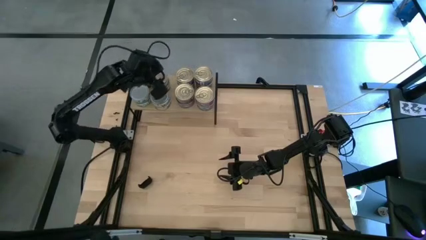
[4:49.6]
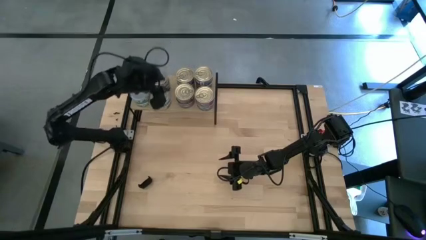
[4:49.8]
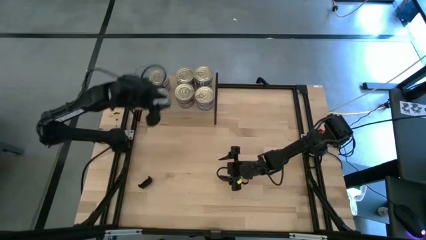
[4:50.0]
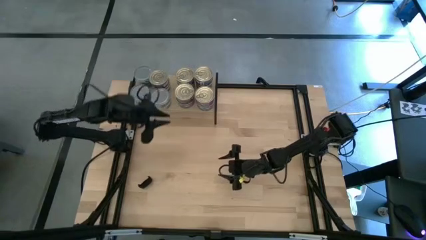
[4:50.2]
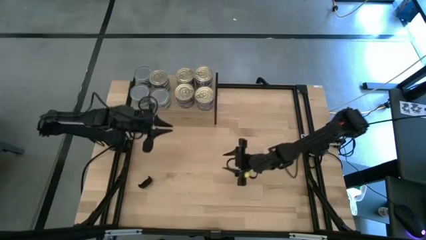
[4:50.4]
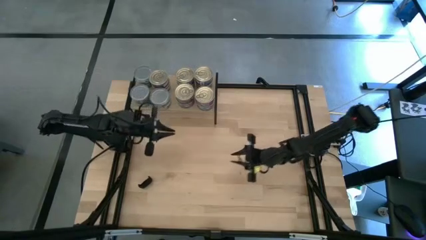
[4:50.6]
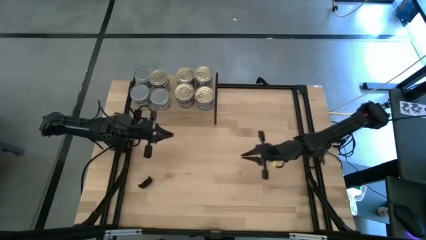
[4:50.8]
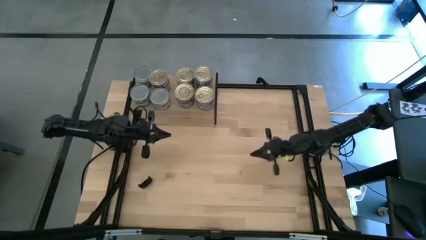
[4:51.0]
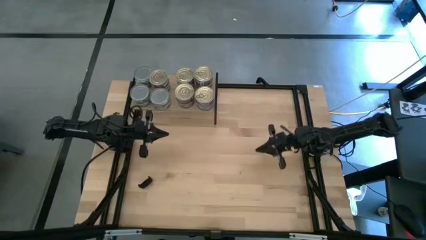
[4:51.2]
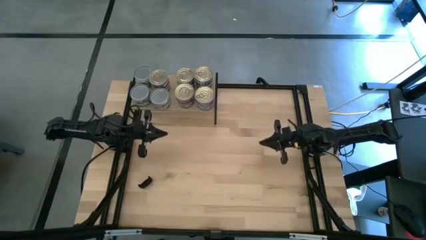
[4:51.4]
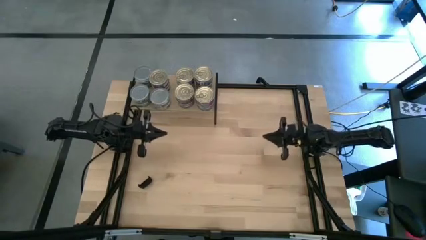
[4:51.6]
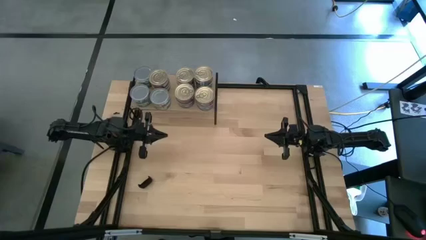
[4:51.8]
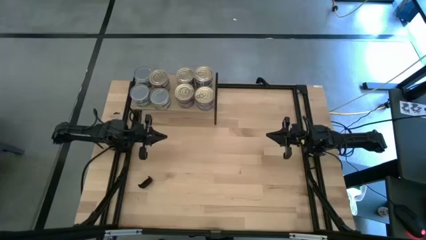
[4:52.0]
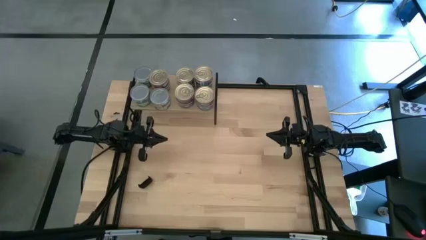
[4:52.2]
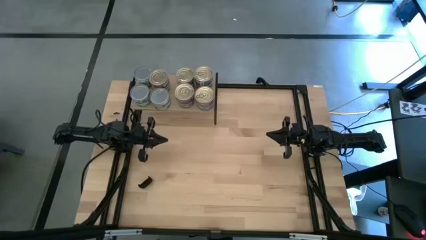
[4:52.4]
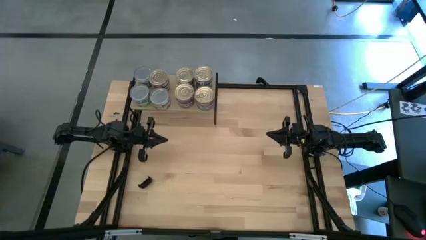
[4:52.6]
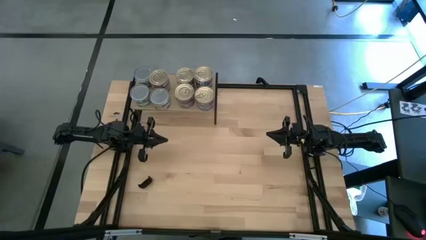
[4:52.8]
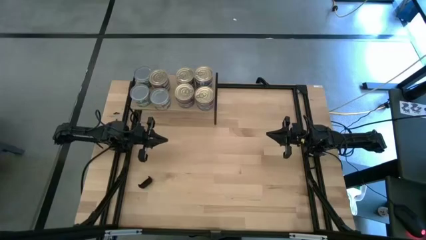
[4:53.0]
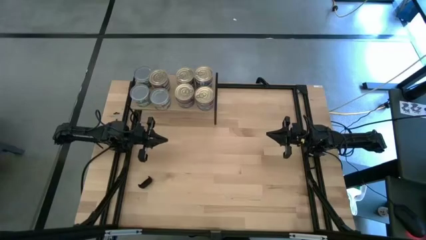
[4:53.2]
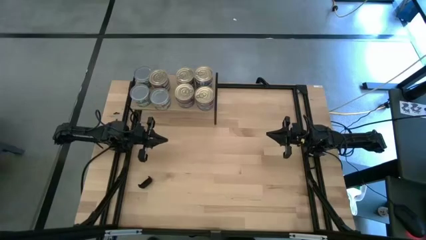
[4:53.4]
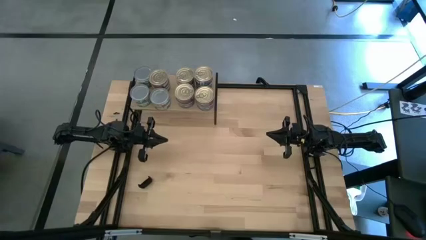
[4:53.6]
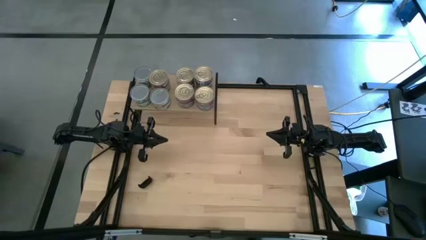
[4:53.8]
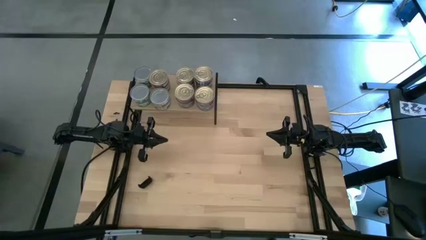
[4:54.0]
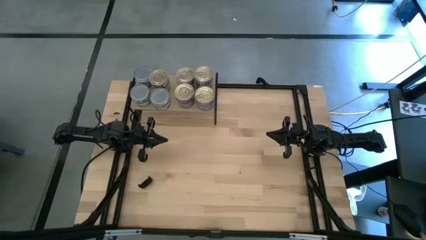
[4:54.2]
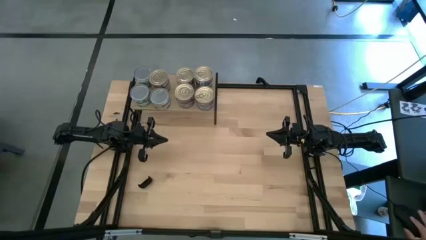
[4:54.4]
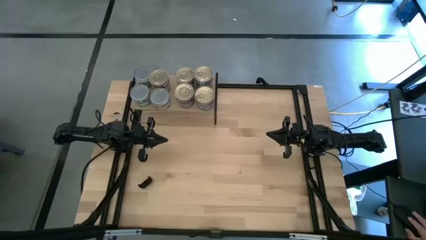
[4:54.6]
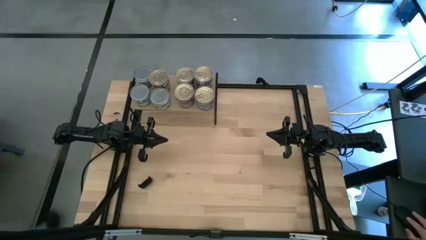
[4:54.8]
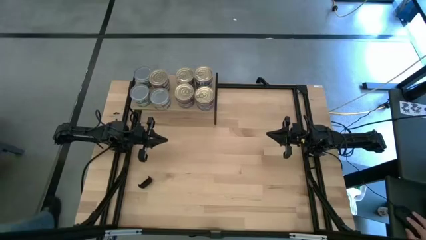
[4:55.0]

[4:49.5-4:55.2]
Task: Stack canned seafood by type on shelf
Return to Home Position

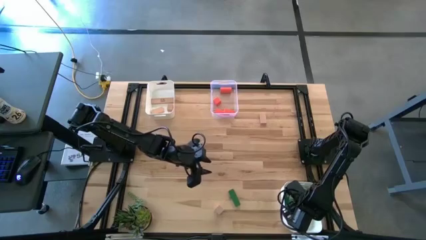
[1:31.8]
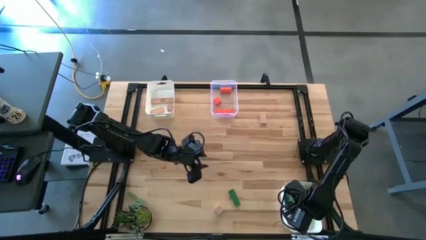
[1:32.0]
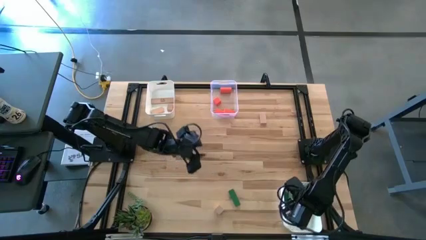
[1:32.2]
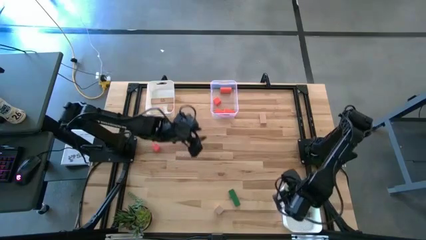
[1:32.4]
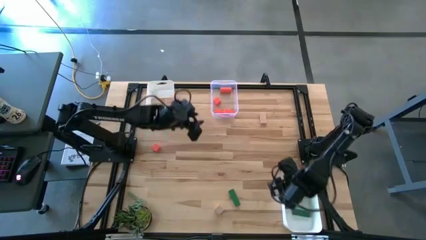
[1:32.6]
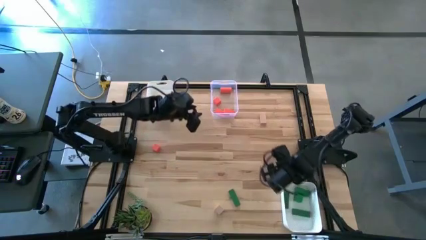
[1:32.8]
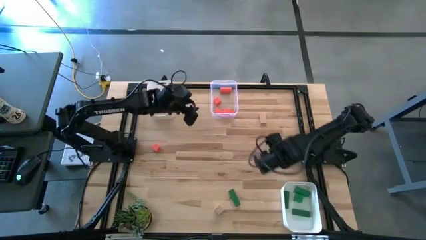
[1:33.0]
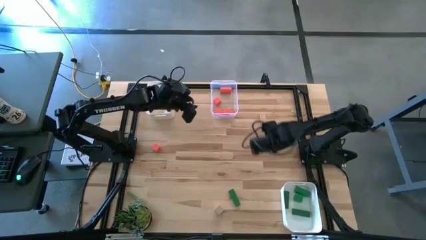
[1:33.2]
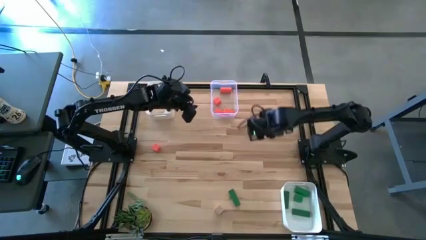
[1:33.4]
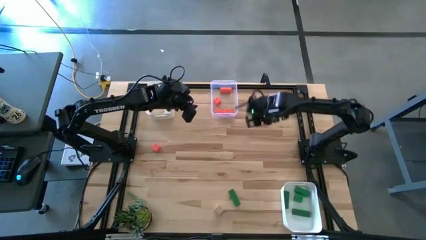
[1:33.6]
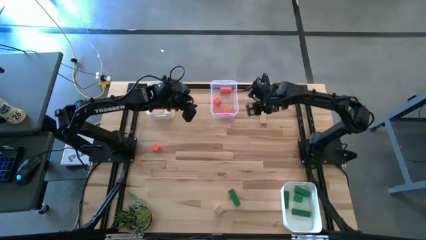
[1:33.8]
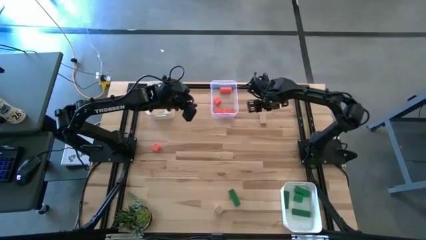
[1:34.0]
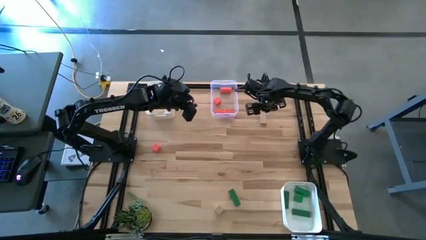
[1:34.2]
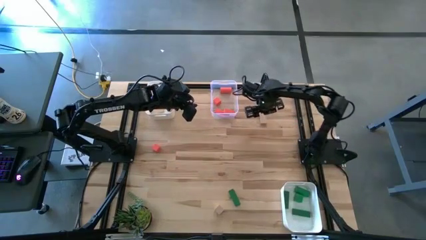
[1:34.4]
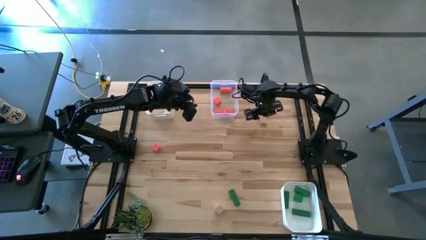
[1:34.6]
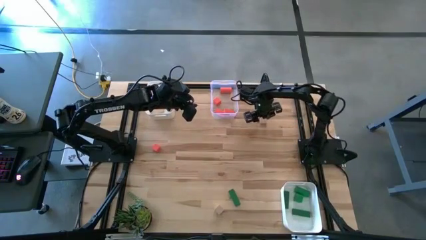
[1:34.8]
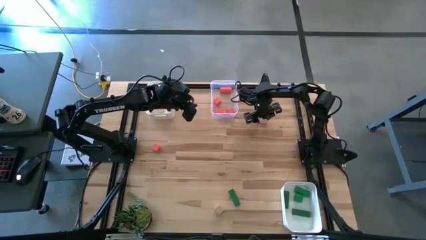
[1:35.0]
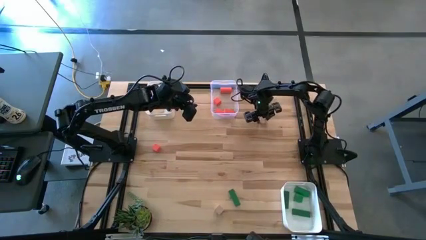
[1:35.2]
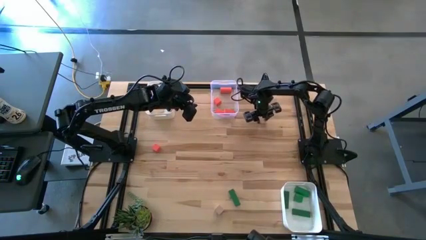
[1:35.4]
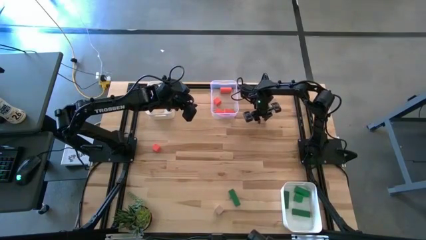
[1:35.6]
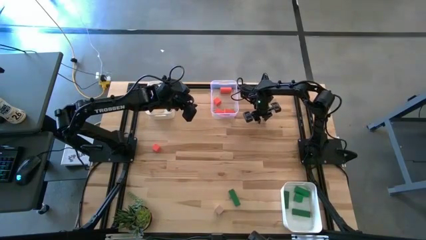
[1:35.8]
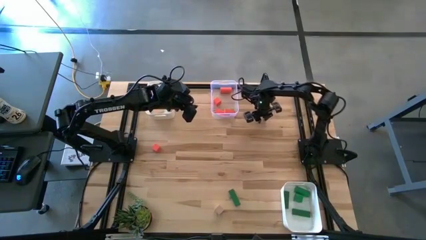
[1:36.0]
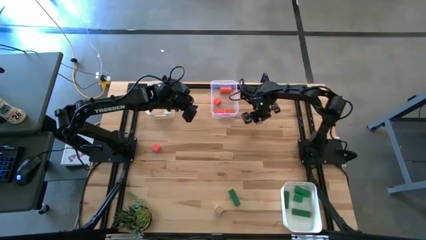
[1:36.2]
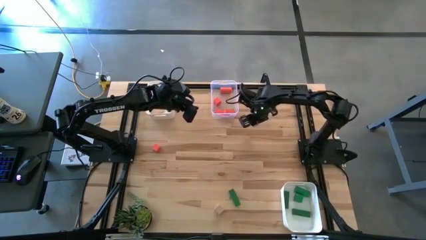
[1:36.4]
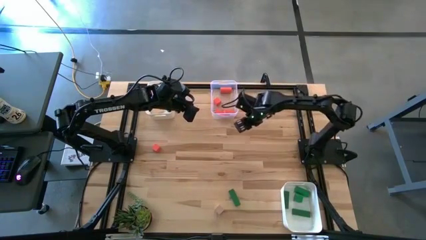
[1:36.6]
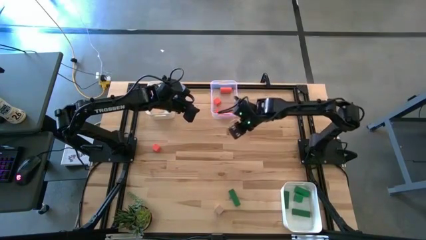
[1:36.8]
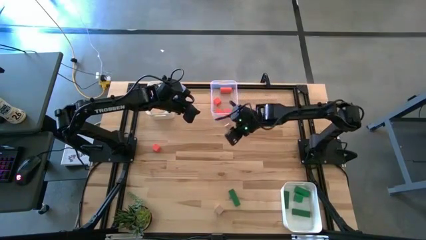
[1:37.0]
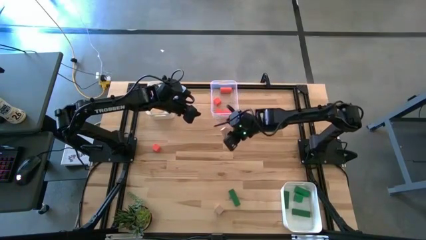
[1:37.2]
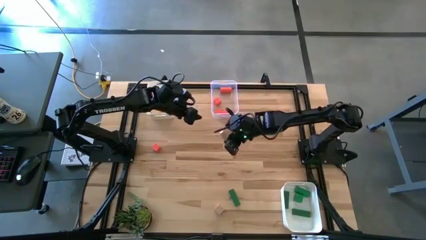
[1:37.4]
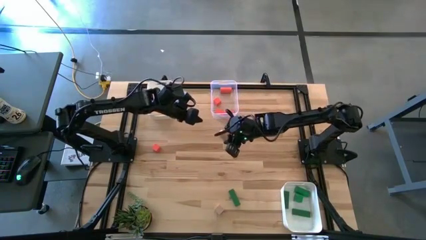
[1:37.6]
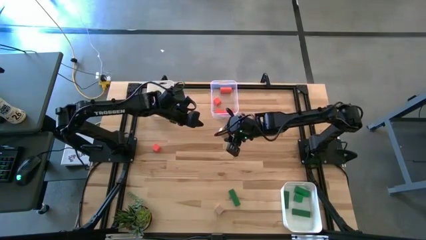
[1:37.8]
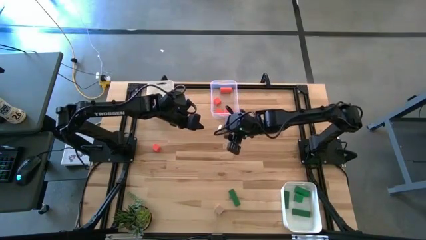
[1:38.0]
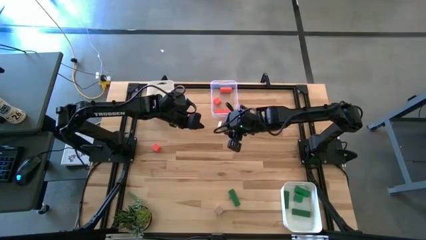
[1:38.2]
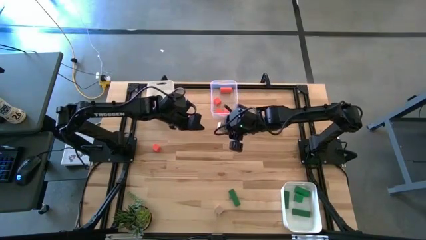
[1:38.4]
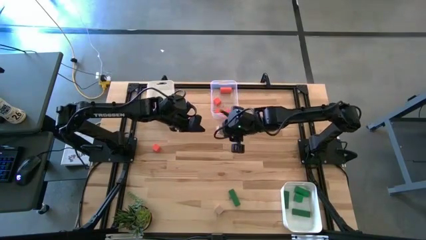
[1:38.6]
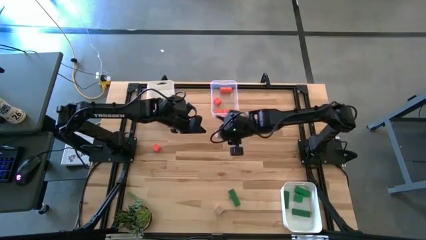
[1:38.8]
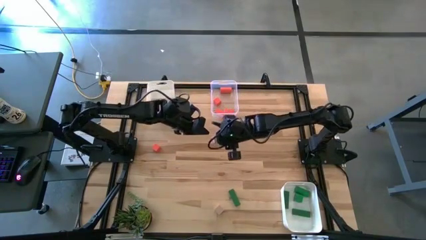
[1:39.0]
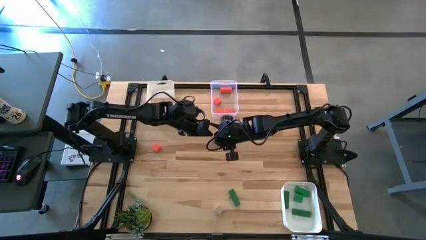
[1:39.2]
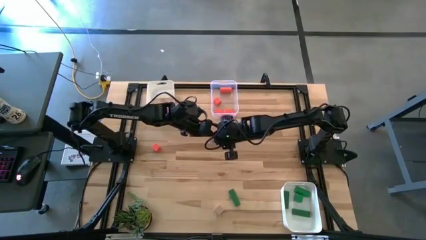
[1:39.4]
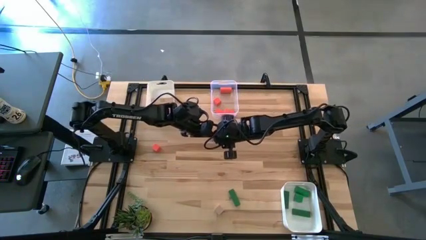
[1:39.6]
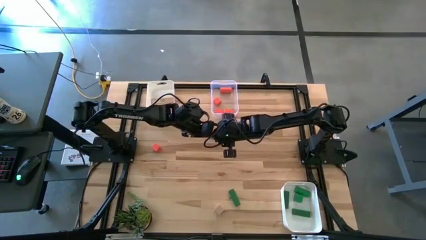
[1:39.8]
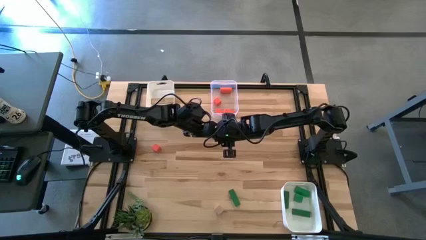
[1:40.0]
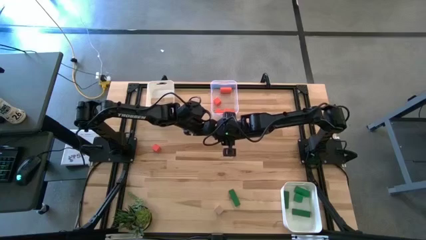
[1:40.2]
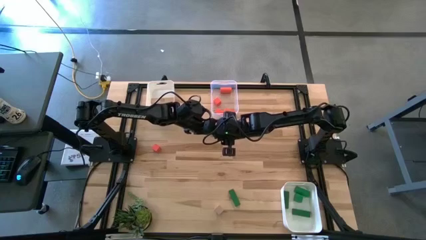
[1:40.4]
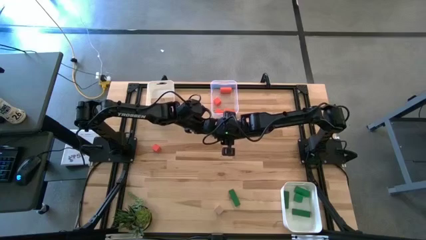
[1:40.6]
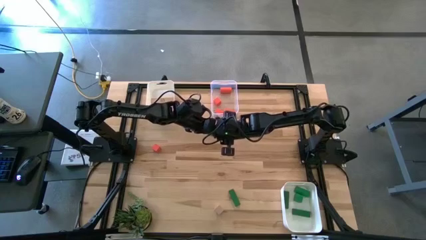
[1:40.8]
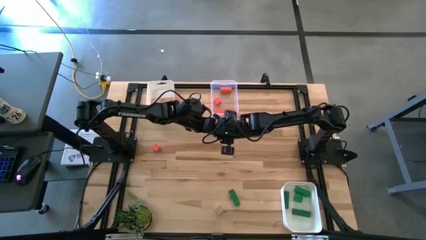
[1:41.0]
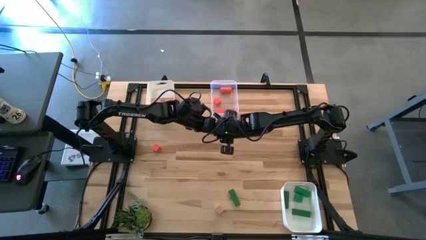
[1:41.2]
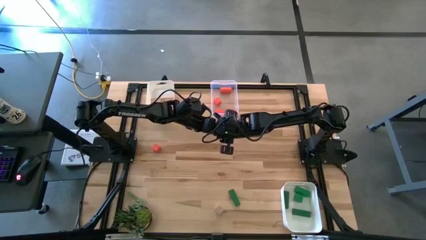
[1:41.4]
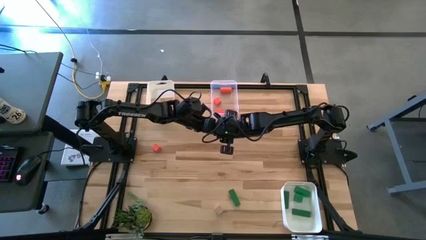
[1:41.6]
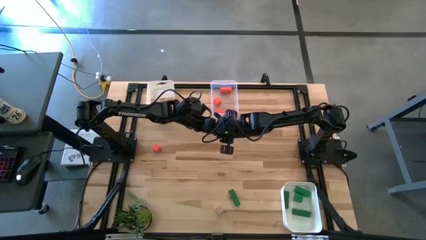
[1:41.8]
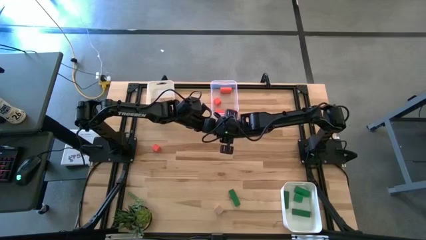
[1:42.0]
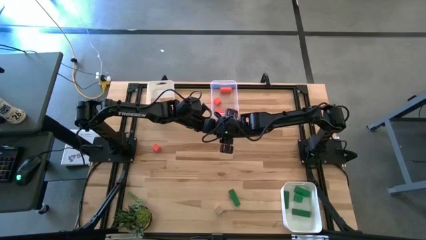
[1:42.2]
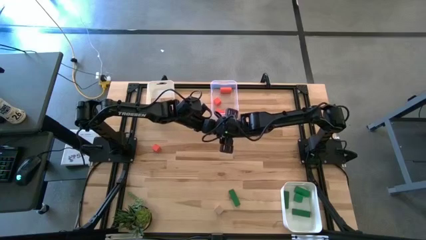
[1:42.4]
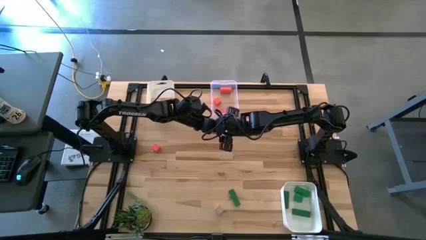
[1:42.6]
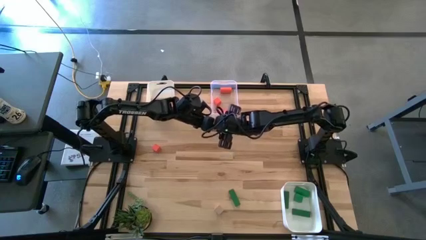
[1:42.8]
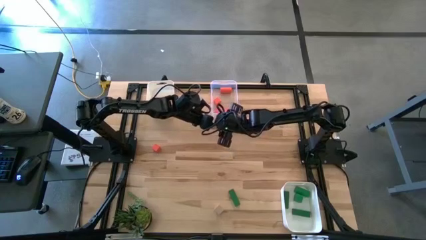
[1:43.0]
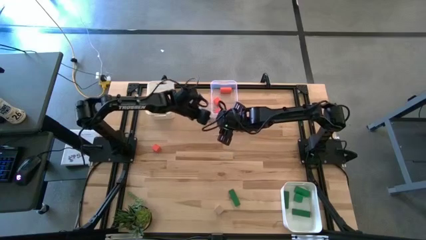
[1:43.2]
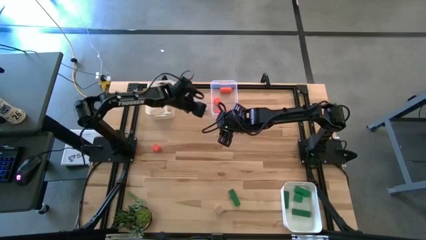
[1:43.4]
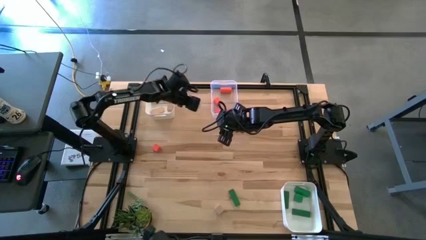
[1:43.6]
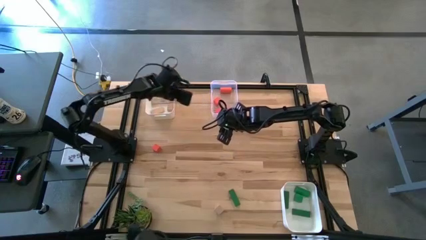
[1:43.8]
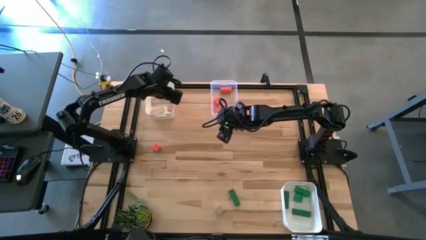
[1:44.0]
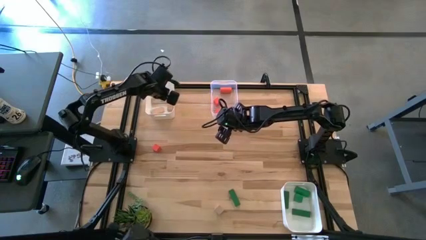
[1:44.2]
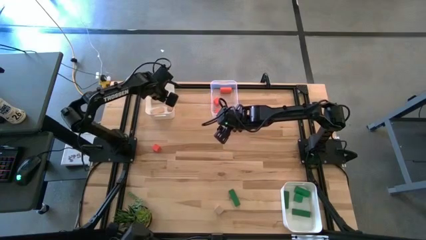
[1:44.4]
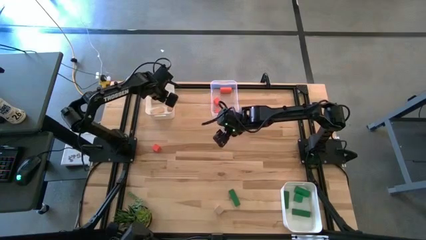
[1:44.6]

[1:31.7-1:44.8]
Task: Sort & place blocks by color
Put the brown block into the top white bin
